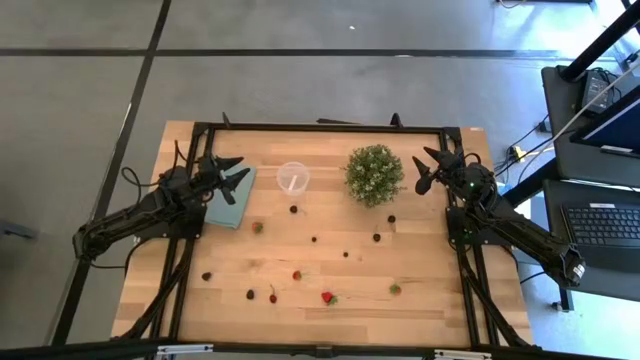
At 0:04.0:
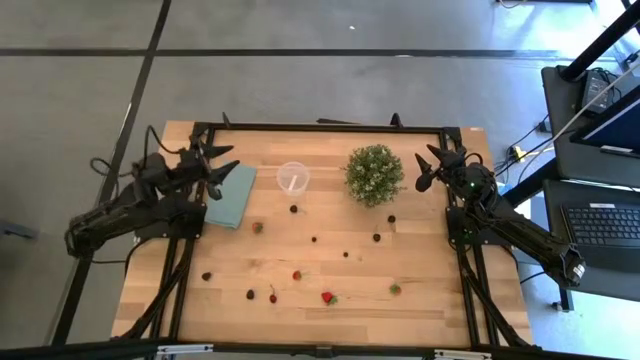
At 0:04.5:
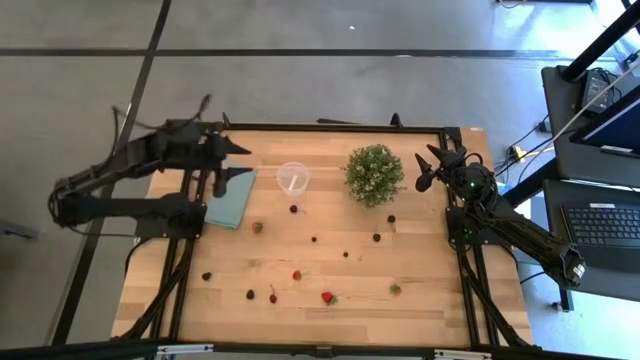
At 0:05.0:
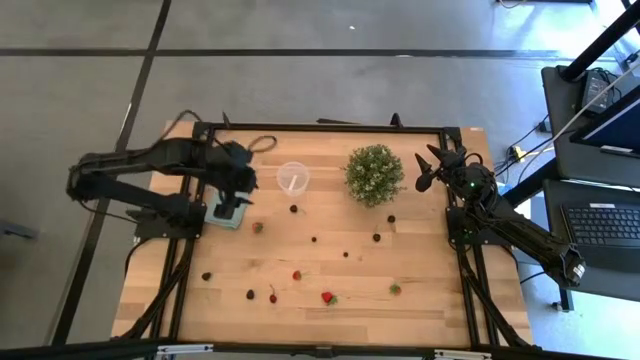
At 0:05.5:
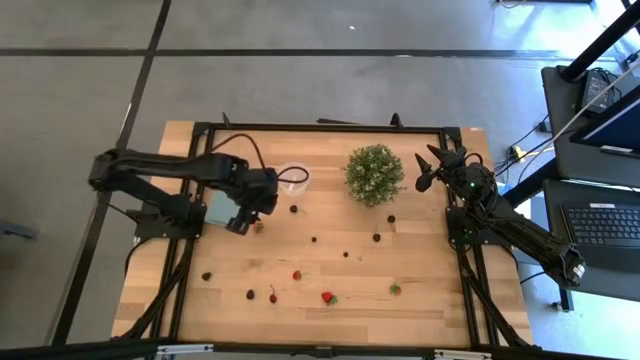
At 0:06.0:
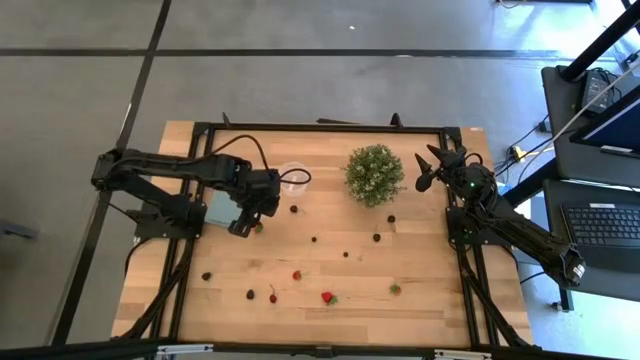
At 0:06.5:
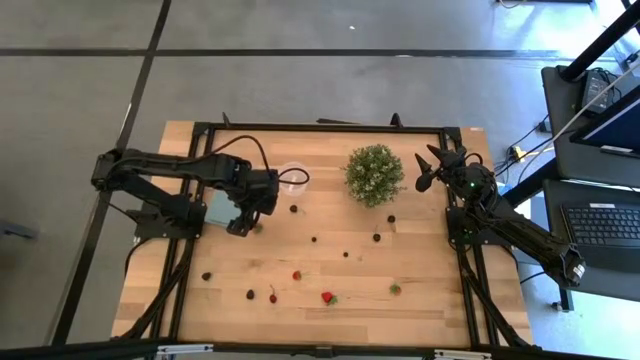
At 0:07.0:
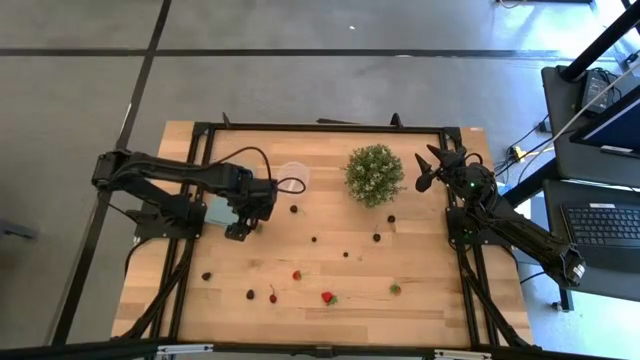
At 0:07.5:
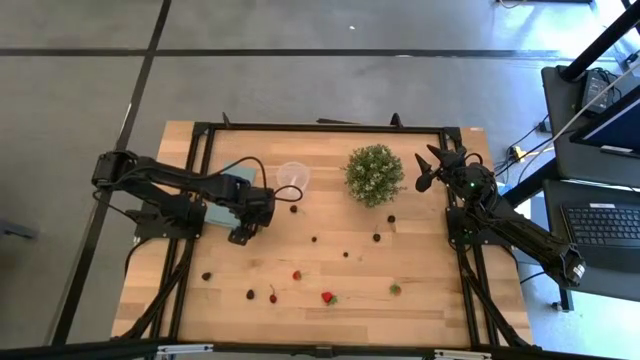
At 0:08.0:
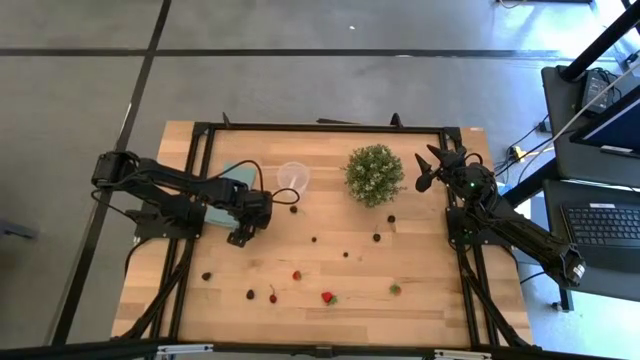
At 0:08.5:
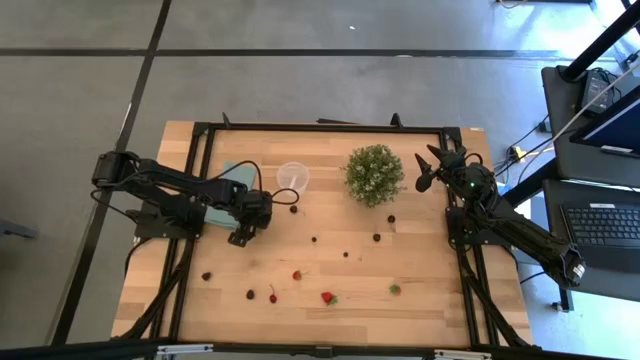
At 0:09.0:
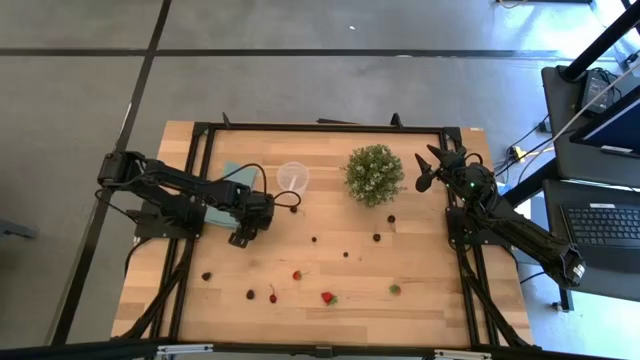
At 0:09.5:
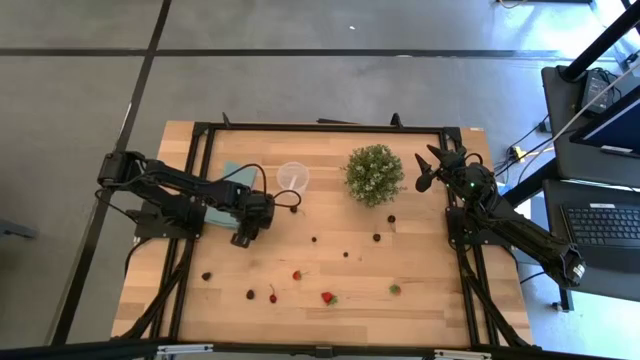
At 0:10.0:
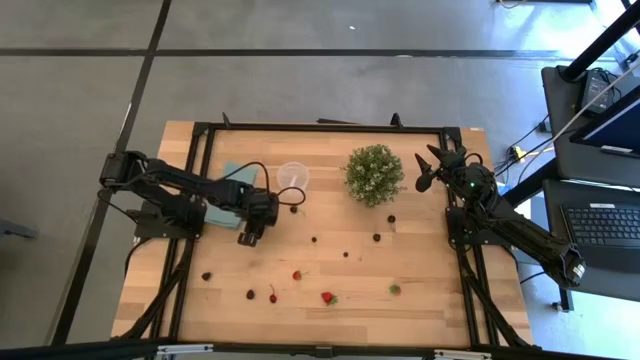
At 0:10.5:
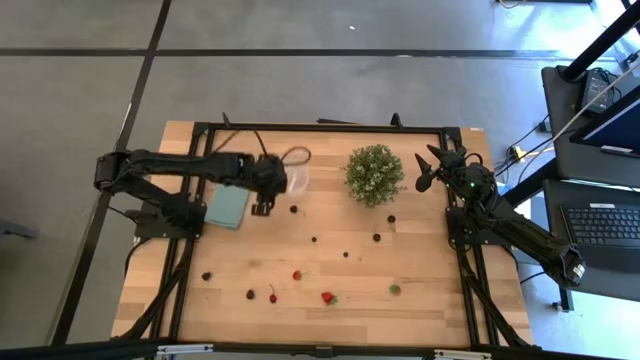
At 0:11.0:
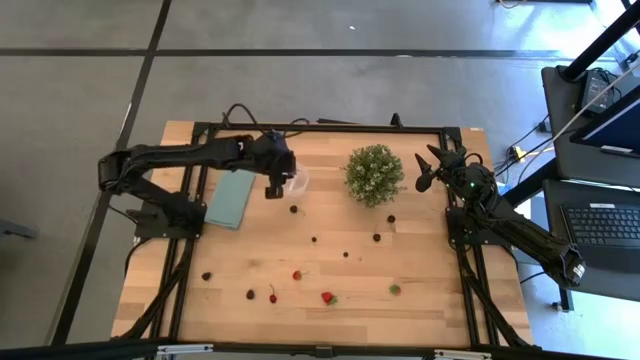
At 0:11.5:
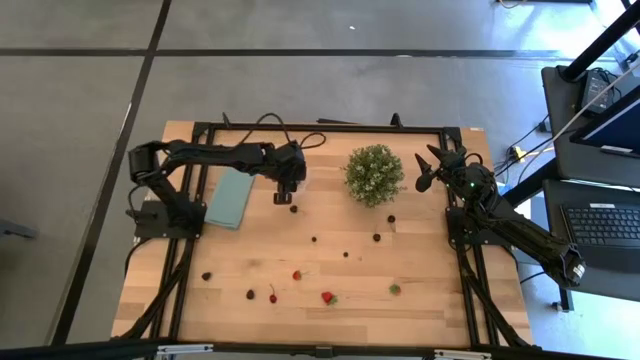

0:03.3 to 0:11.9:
Task: Pick and placing Produce into tupperware
Put the red strawberry into the transparent container

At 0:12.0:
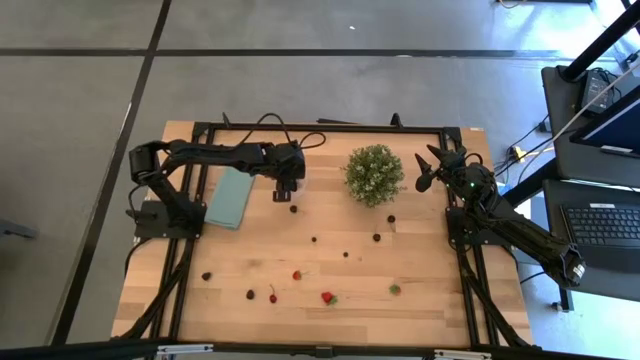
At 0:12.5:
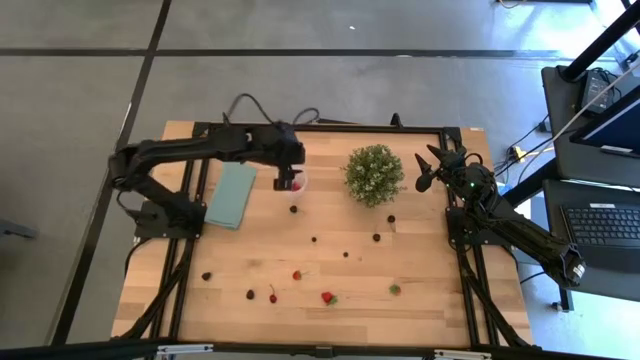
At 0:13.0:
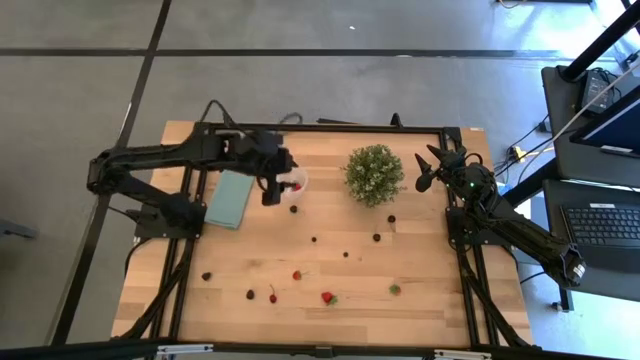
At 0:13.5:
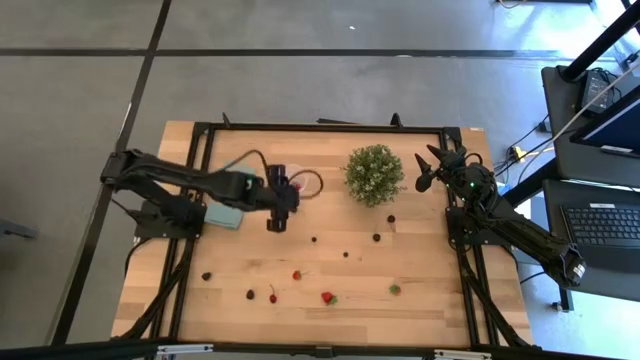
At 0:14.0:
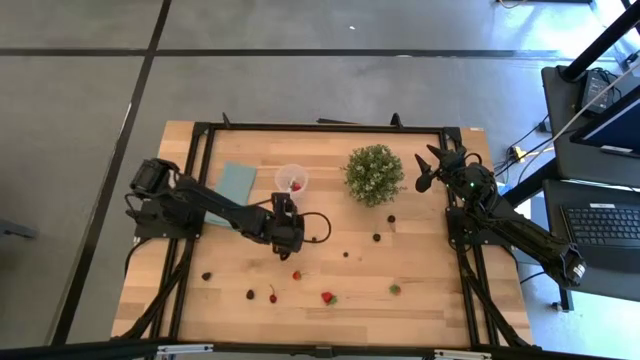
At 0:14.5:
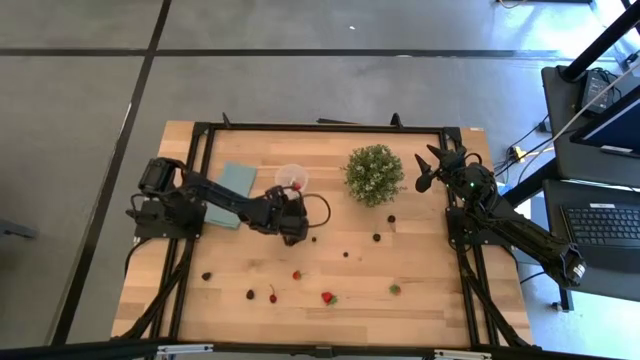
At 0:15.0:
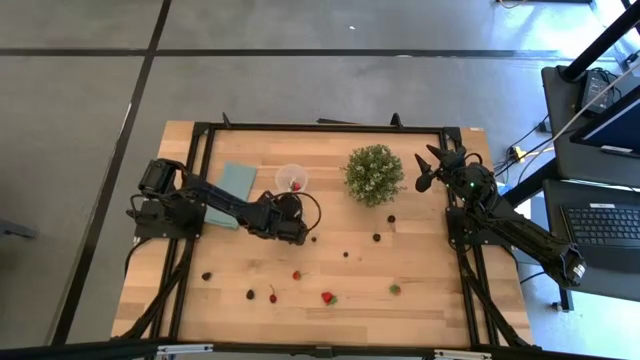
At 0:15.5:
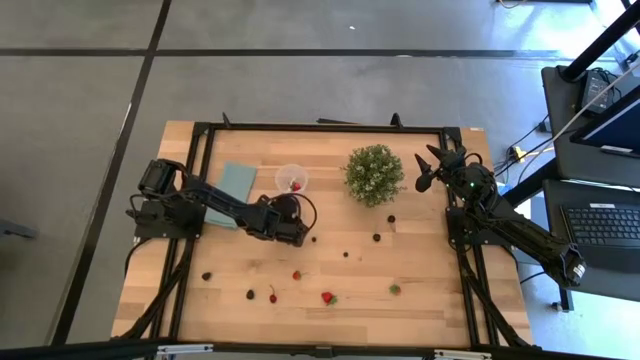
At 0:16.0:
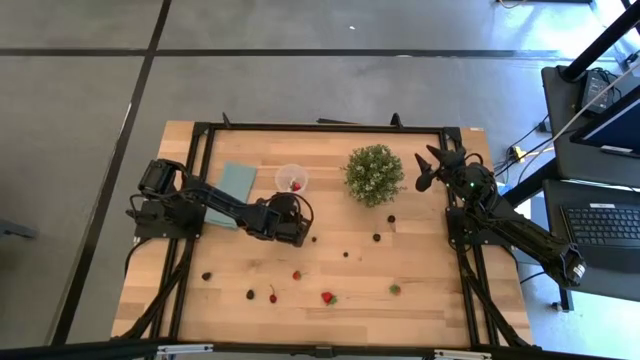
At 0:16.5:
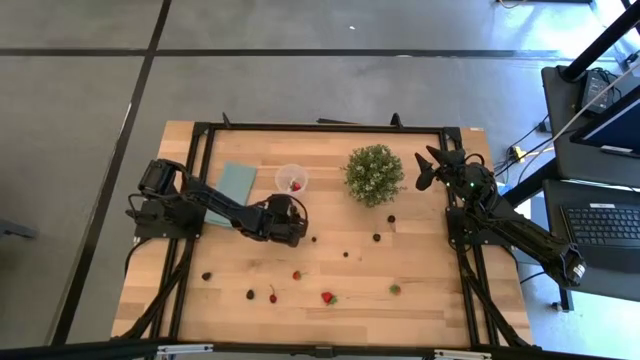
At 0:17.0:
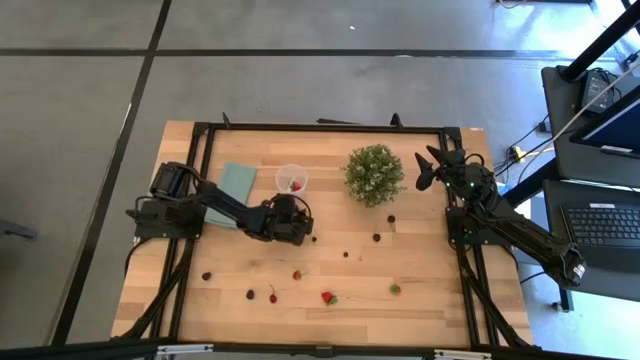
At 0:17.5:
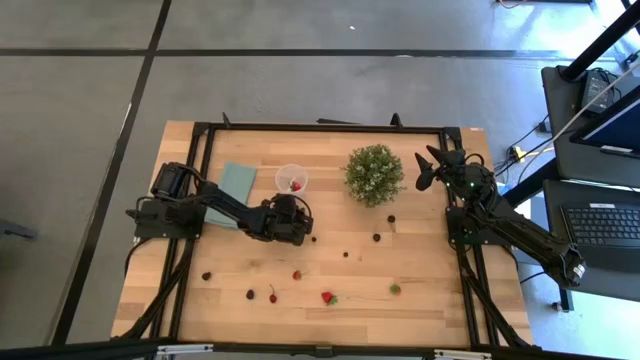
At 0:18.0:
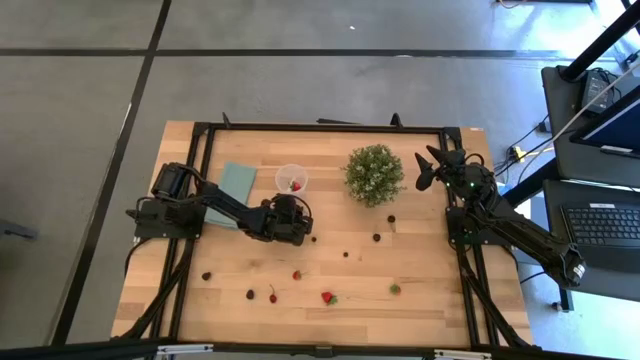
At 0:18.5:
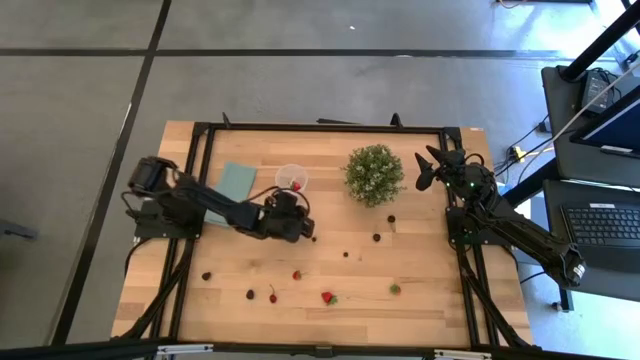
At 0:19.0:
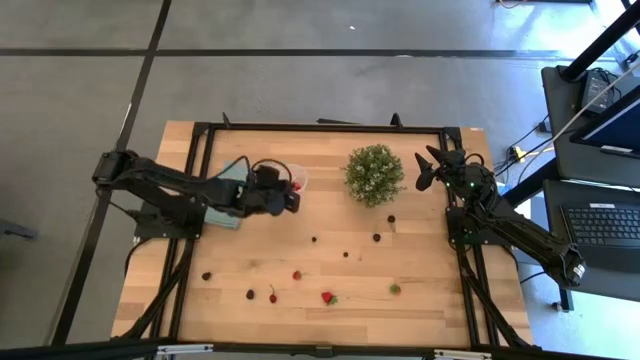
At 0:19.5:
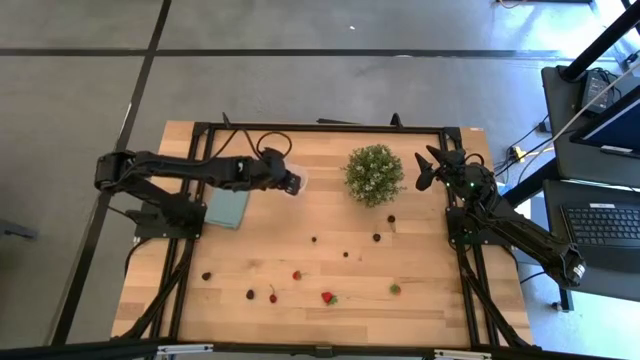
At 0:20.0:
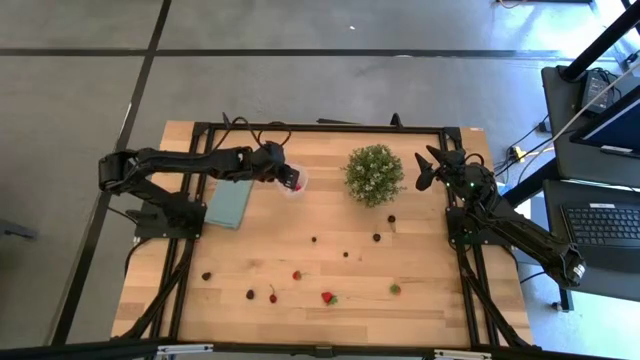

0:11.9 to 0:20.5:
Put the black cherry into the transparent container

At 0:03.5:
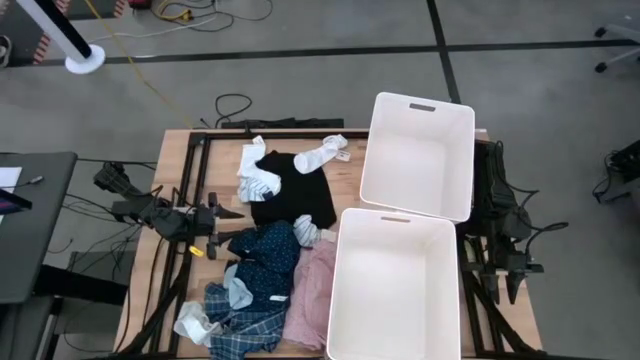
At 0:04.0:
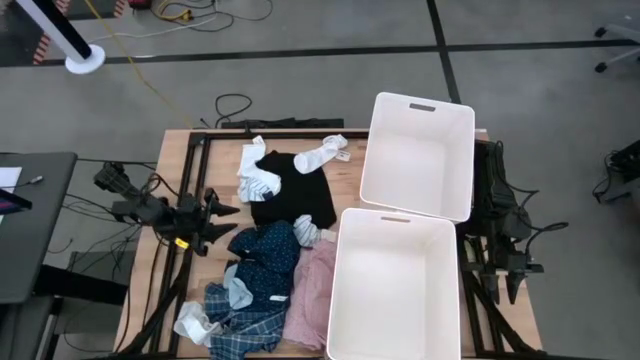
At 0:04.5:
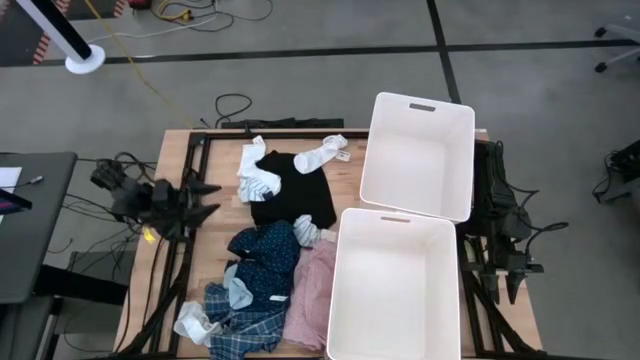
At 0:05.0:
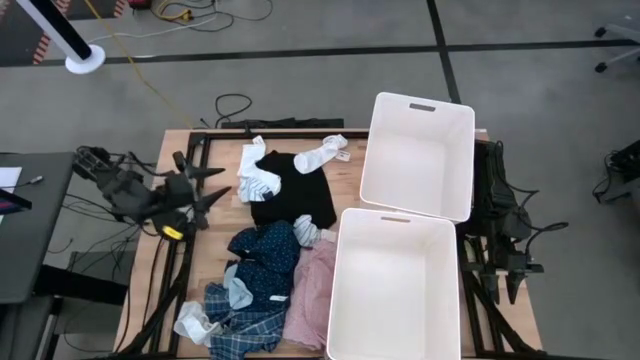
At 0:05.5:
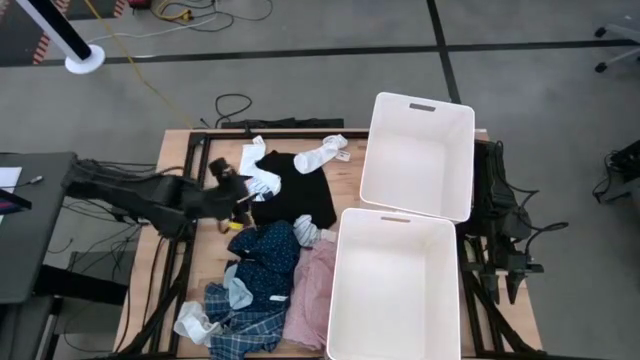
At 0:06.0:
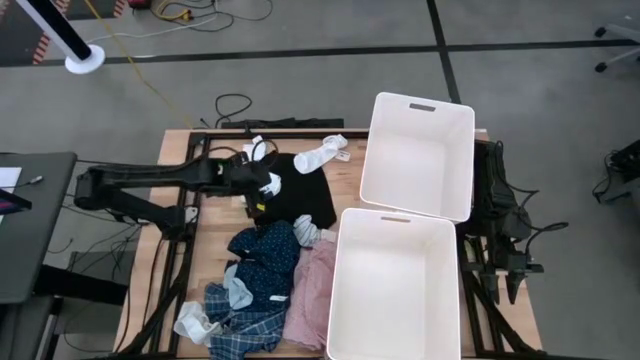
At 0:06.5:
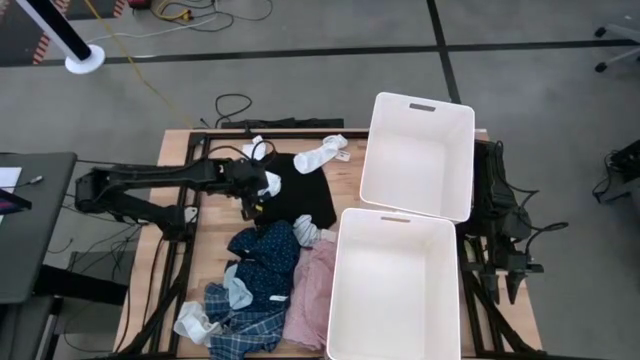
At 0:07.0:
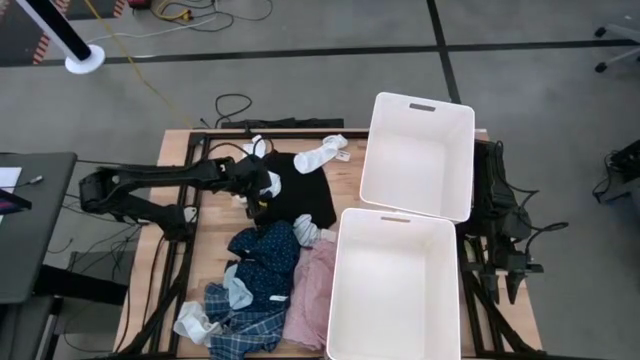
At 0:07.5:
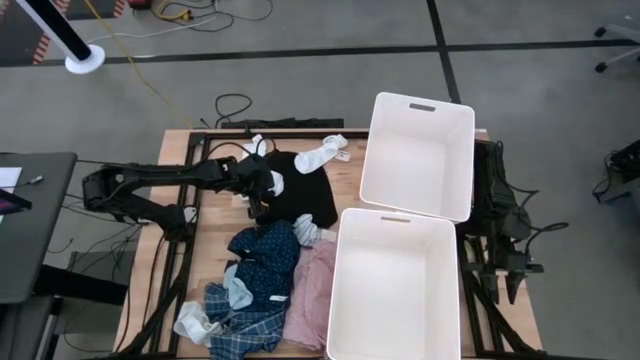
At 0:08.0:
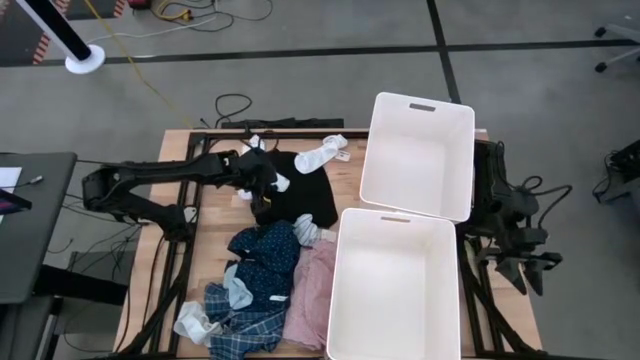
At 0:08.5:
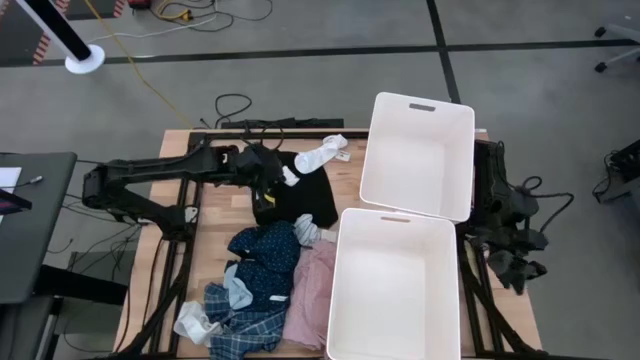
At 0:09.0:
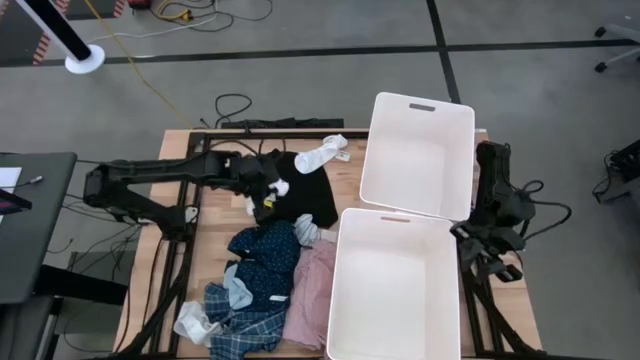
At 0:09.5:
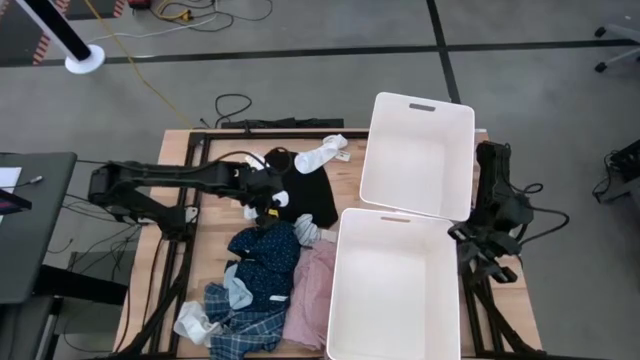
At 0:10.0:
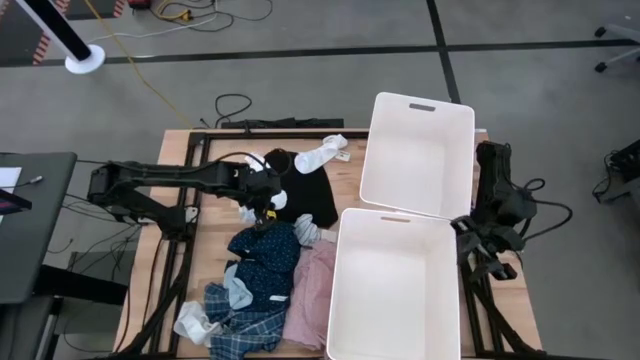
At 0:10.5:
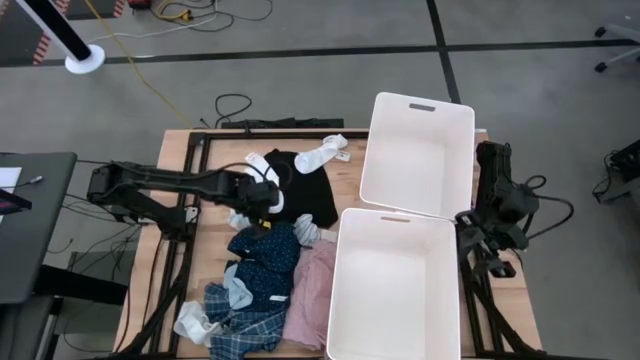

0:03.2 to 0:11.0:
Task: Sort clothes
Put the left white striped sock into the bottom laundry bin
